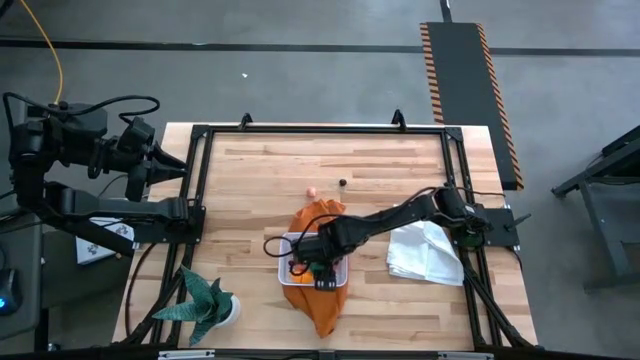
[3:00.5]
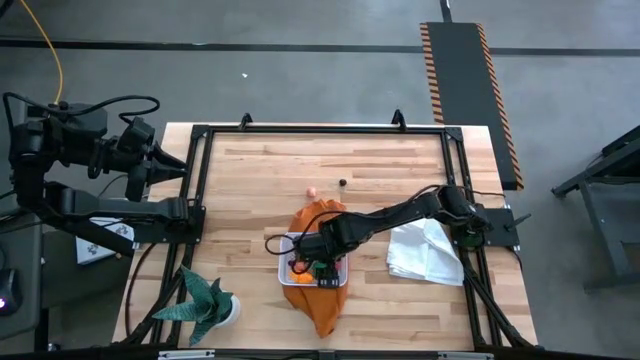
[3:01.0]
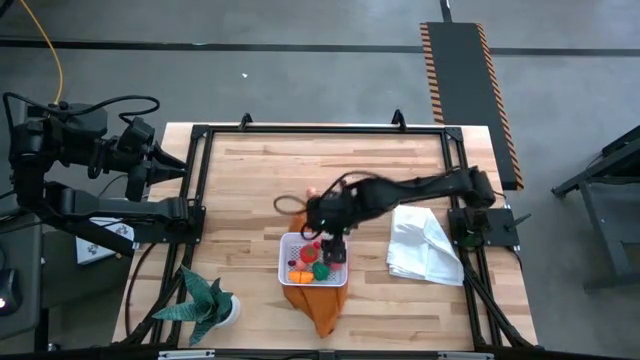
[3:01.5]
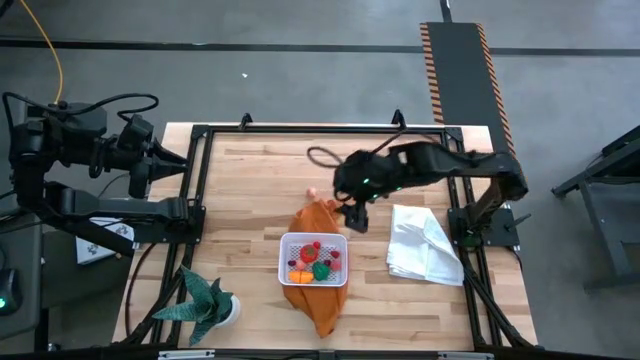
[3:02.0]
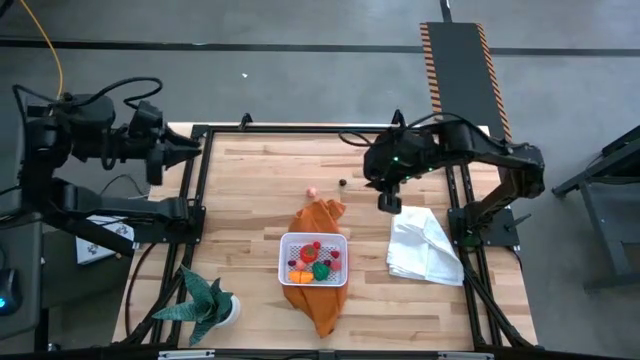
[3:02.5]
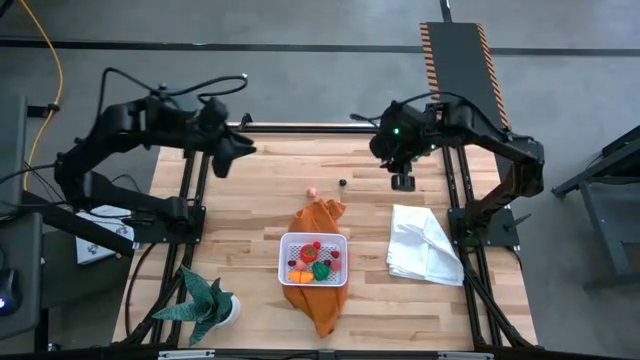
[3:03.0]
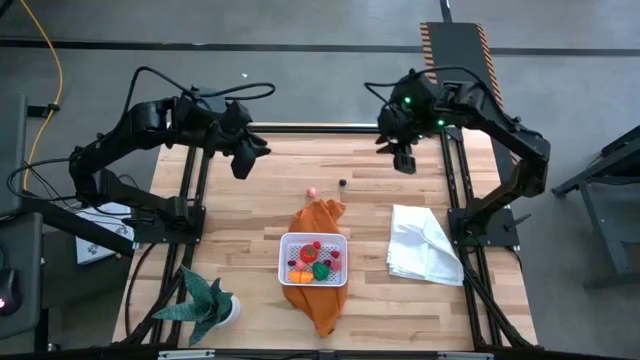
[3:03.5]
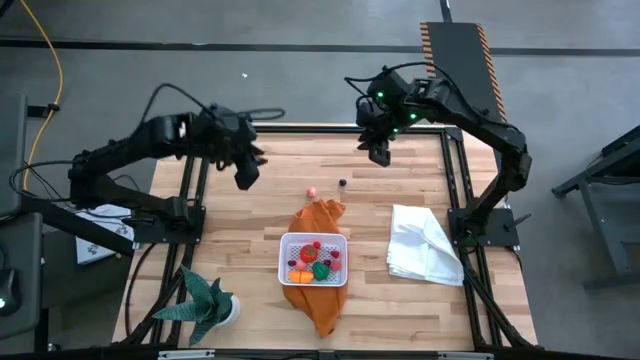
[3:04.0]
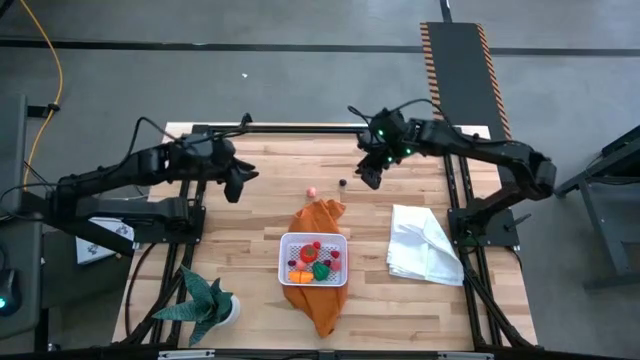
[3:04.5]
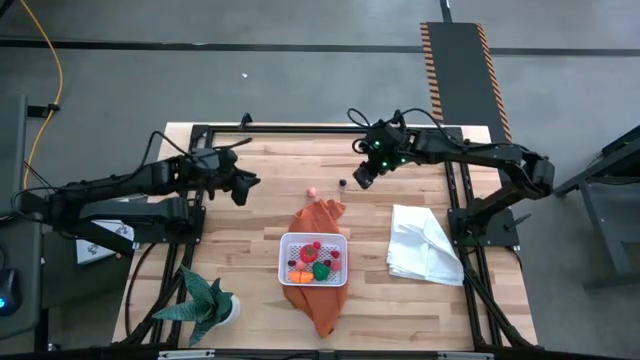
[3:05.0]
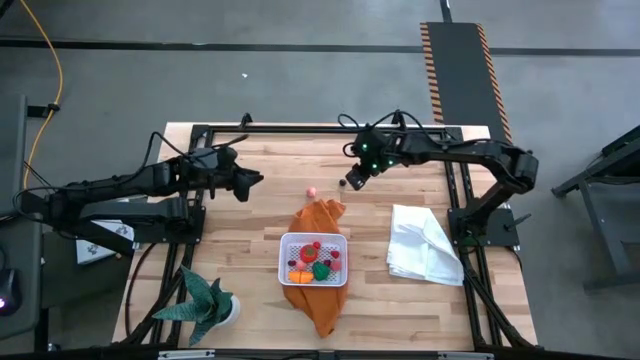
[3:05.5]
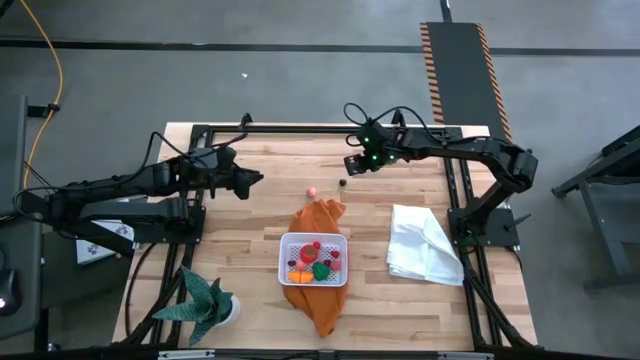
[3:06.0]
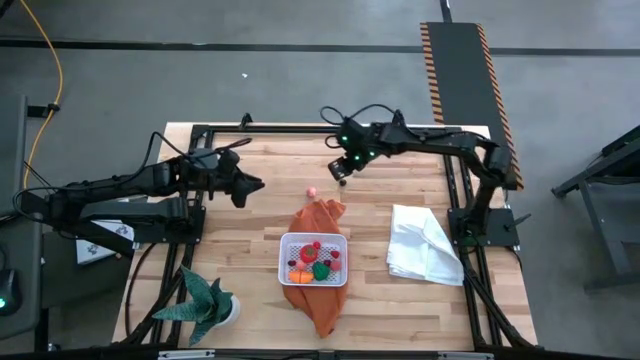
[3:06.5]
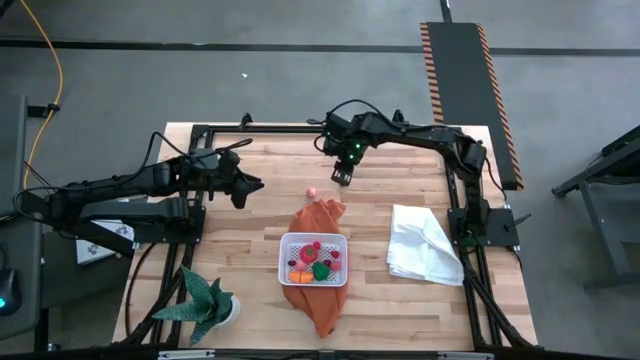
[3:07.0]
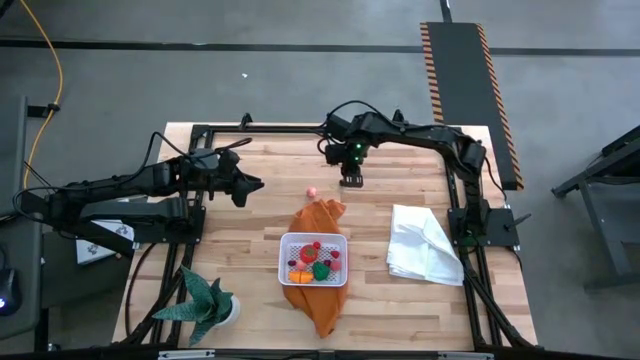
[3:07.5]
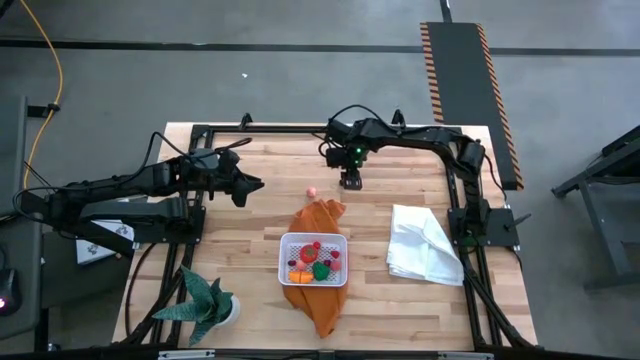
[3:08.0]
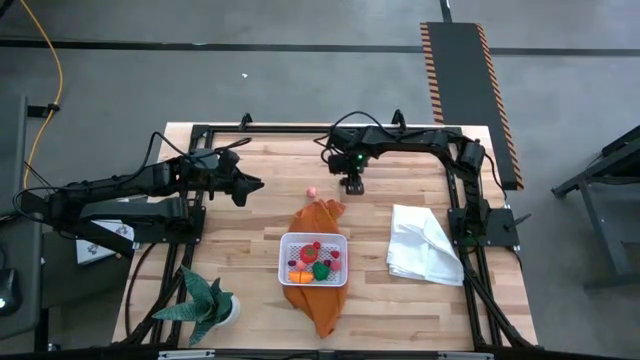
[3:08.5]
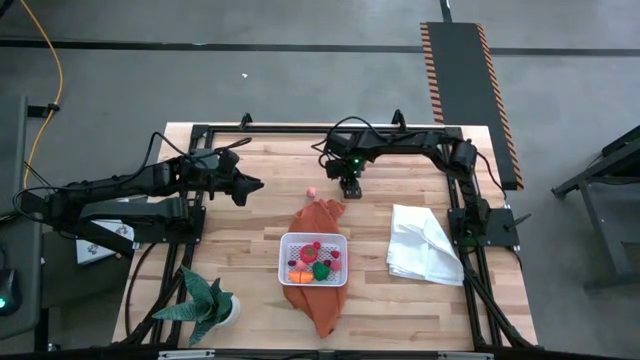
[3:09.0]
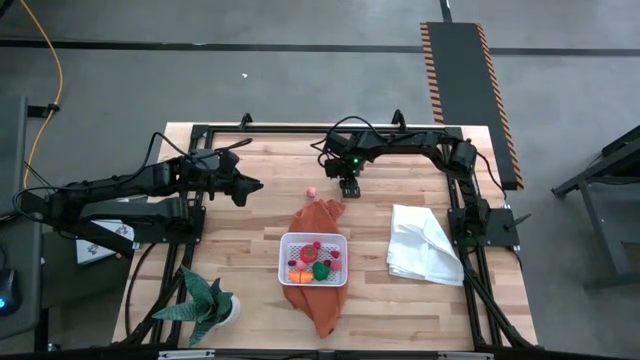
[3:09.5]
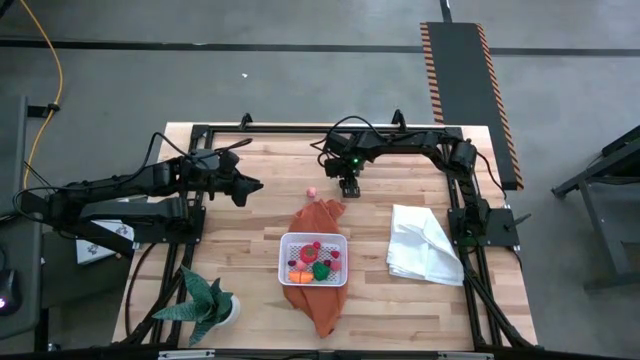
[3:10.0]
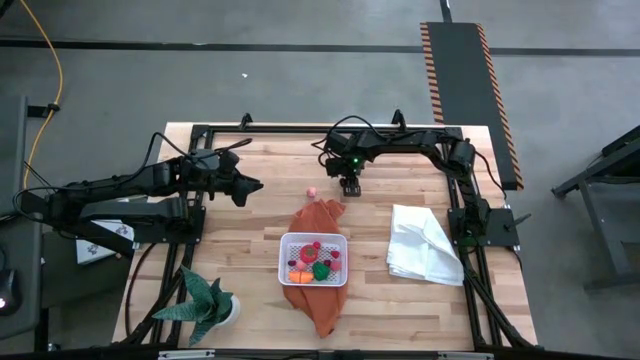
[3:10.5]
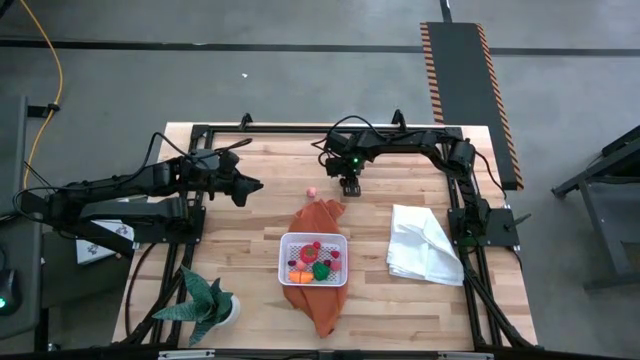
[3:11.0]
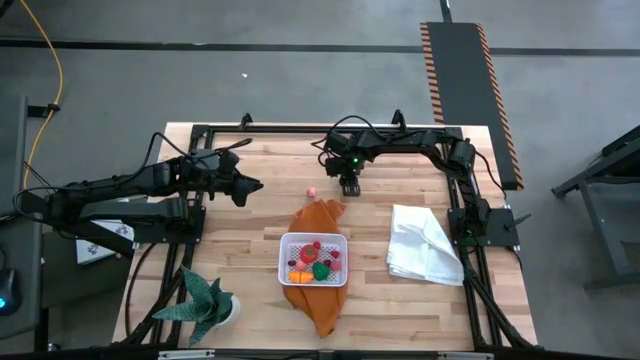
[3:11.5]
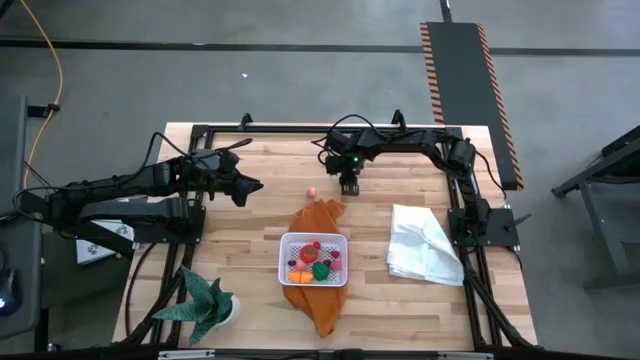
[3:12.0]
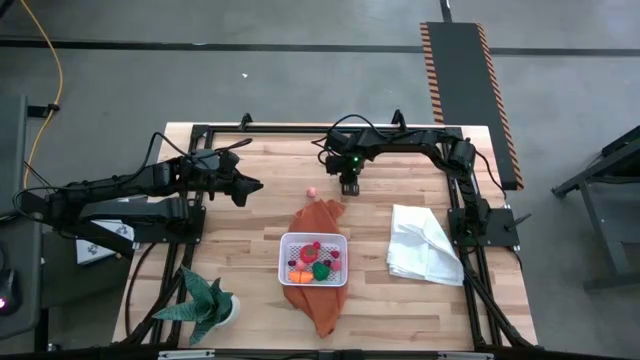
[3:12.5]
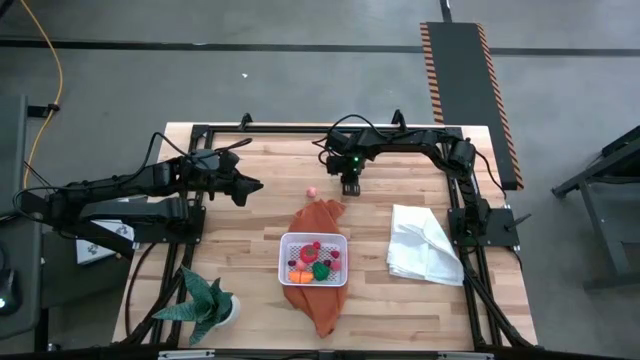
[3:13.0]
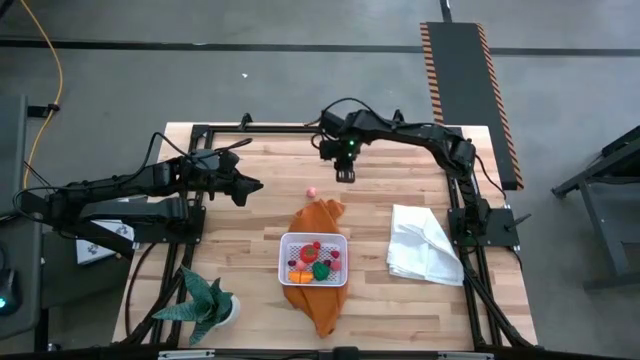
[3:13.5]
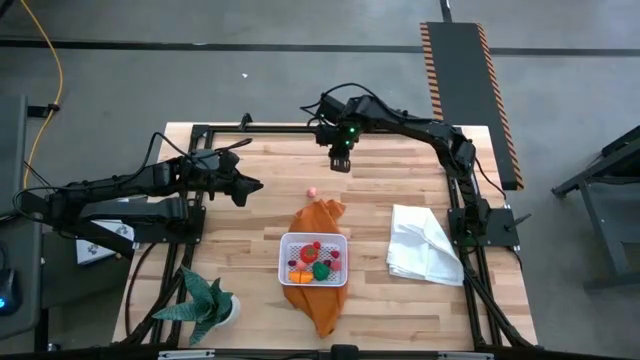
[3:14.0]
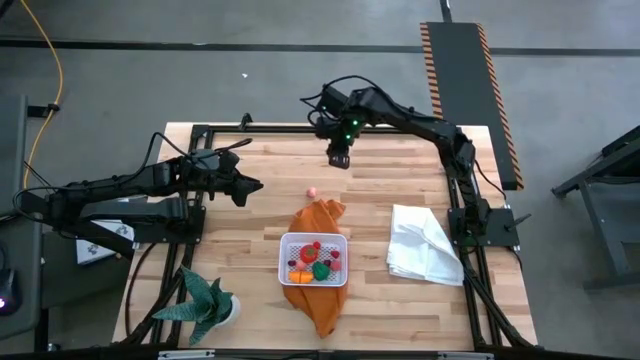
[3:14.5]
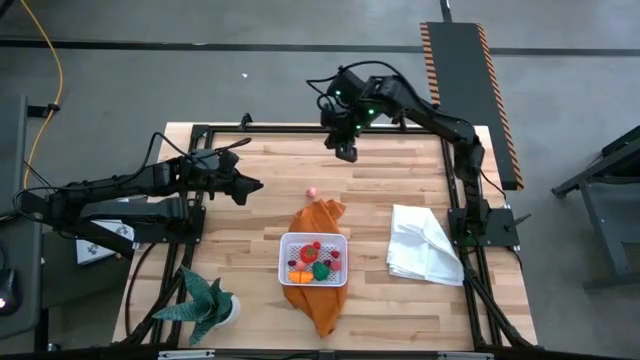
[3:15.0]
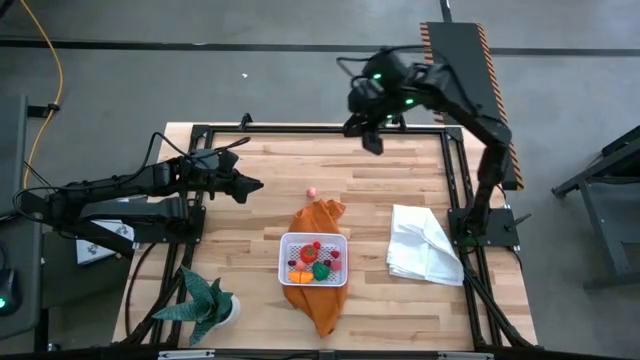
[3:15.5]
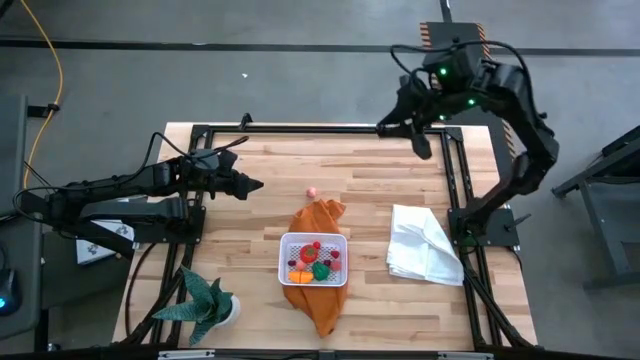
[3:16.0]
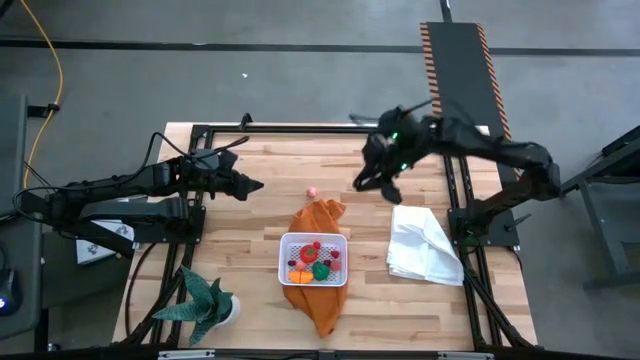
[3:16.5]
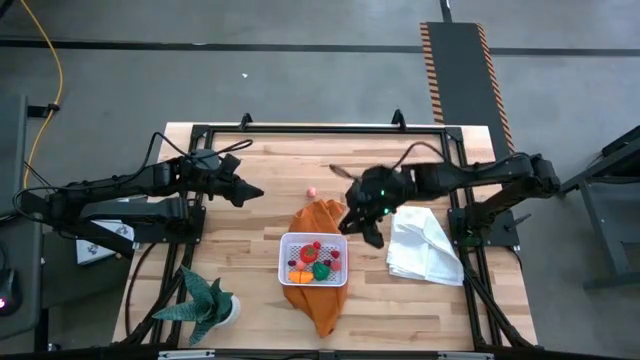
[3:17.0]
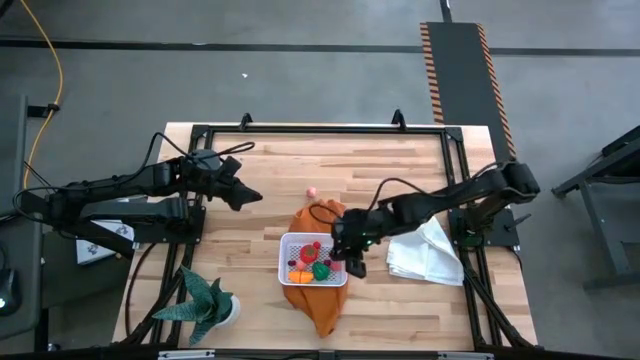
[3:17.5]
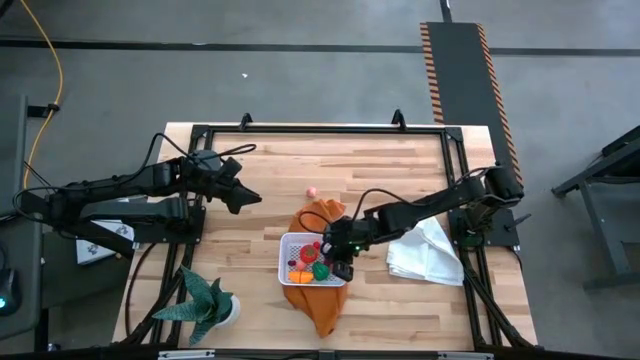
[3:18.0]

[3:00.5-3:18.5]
Task: Pick and placing Produce into tupperware
Put the black berry into the white basket
